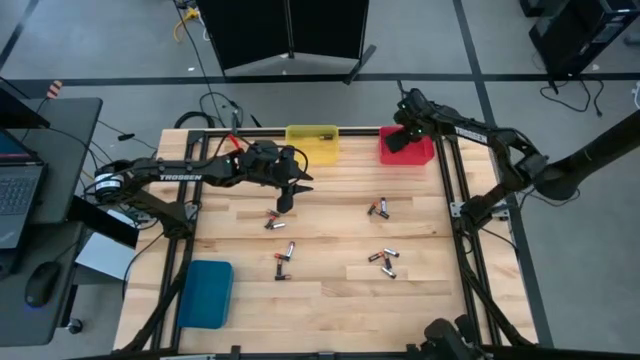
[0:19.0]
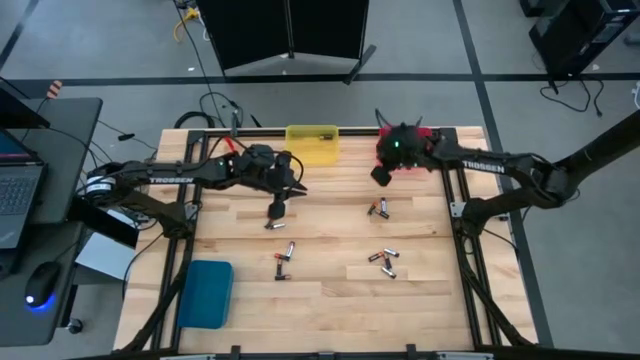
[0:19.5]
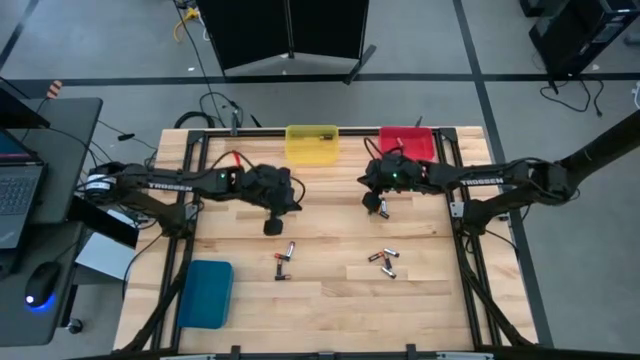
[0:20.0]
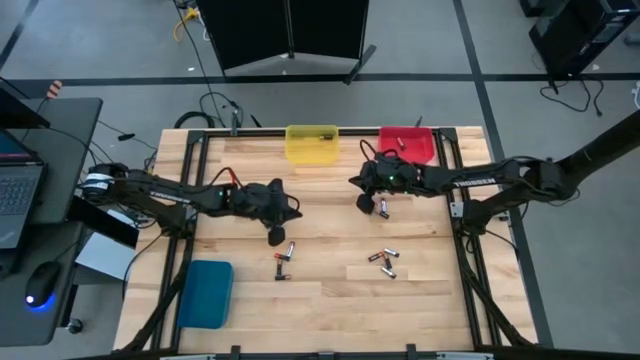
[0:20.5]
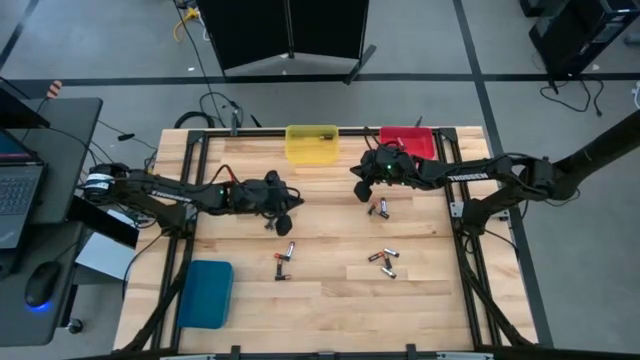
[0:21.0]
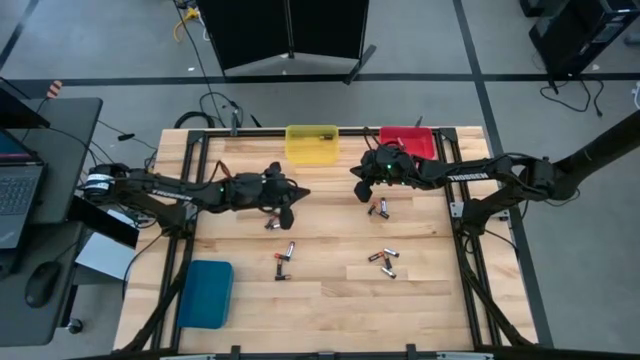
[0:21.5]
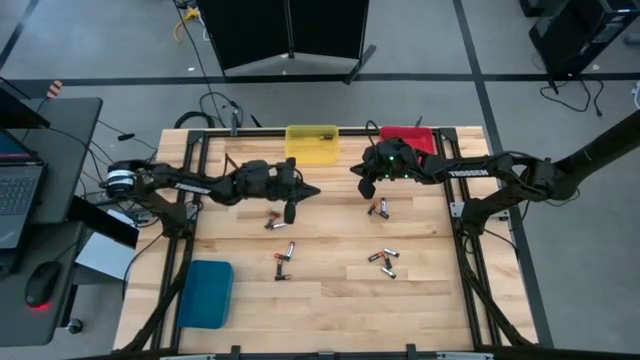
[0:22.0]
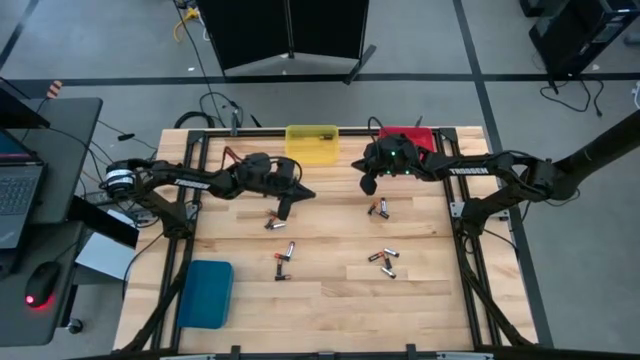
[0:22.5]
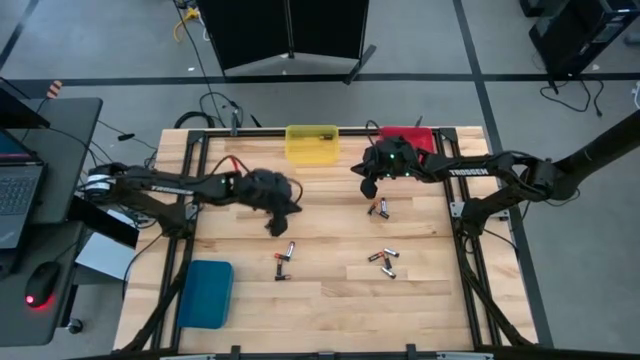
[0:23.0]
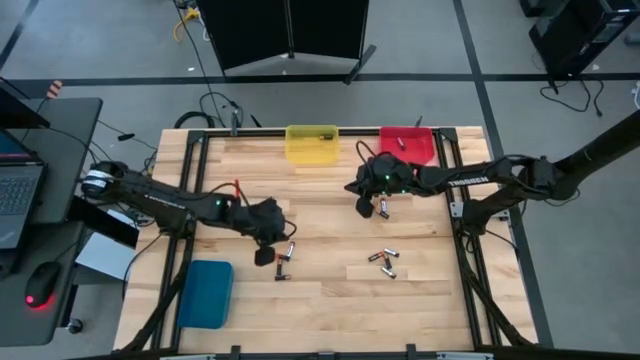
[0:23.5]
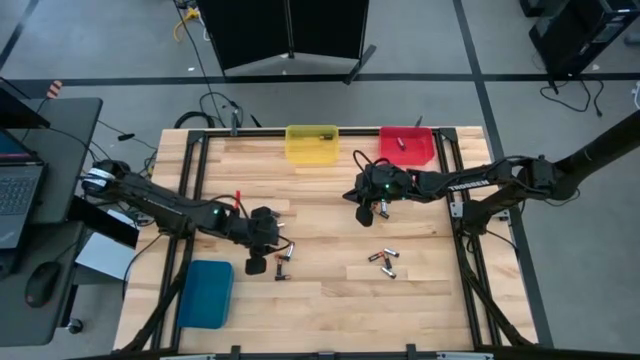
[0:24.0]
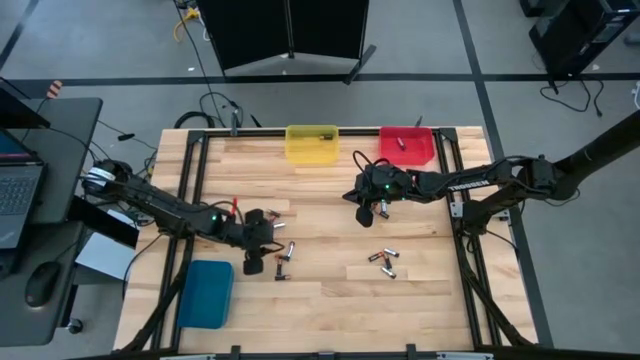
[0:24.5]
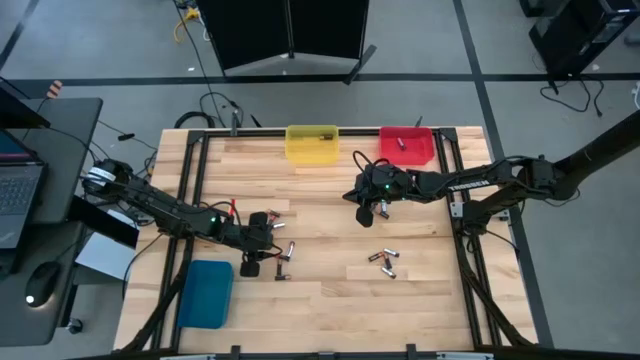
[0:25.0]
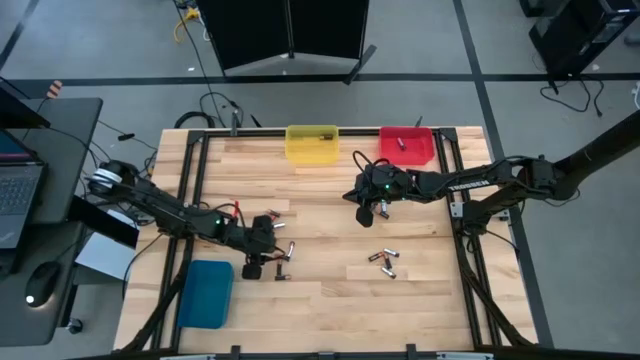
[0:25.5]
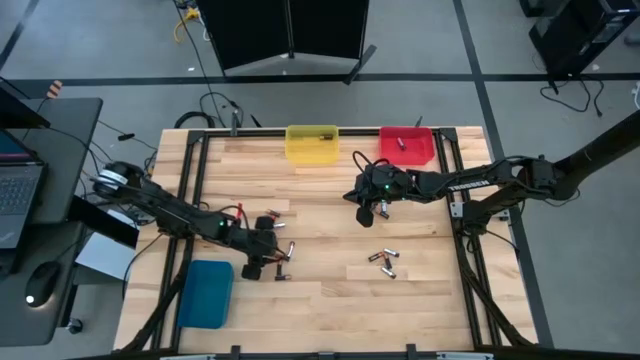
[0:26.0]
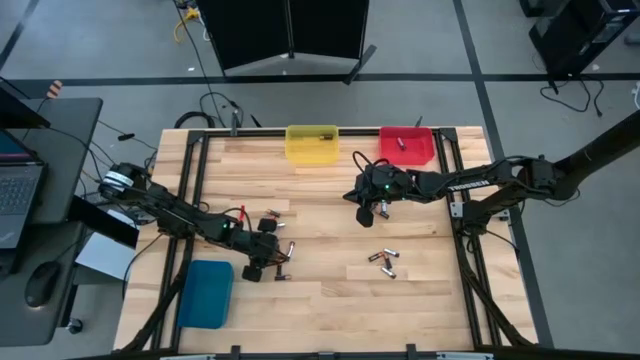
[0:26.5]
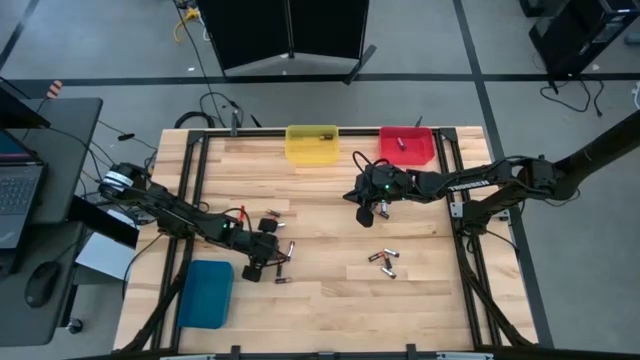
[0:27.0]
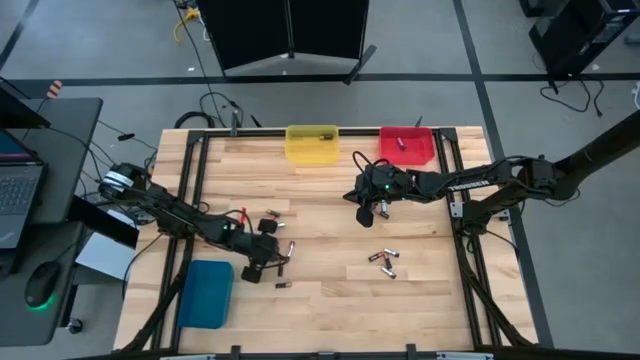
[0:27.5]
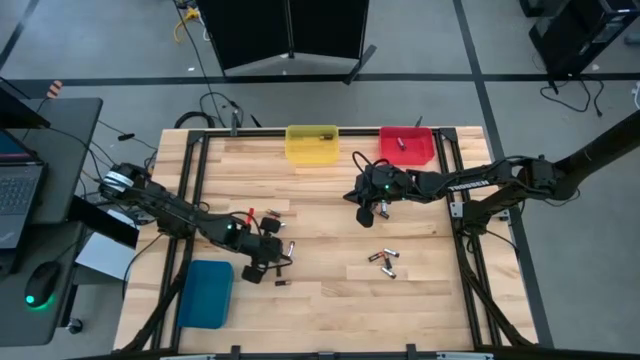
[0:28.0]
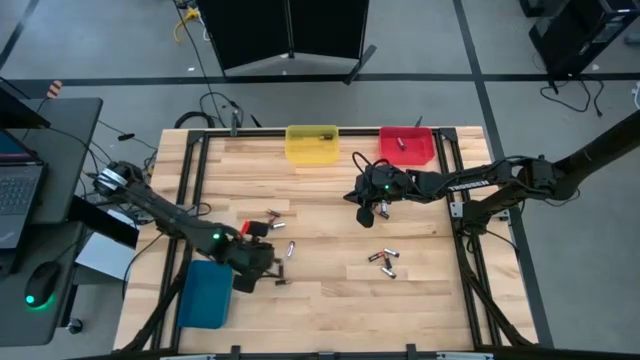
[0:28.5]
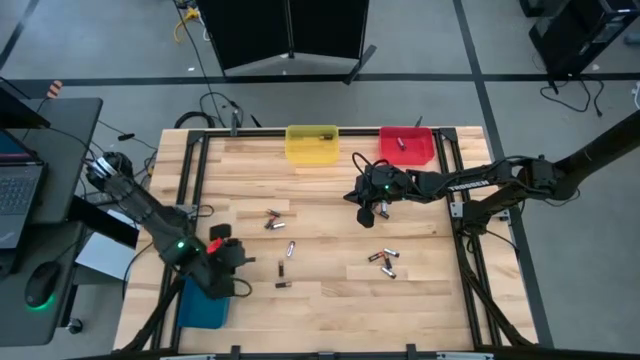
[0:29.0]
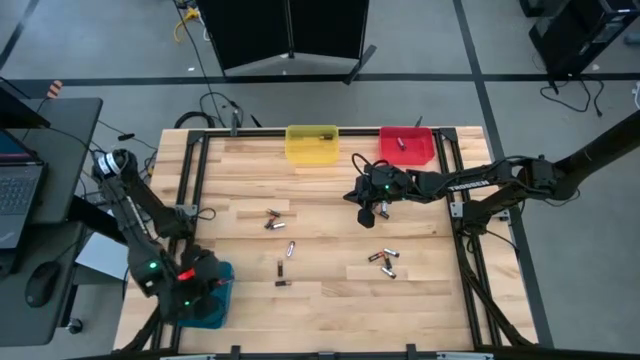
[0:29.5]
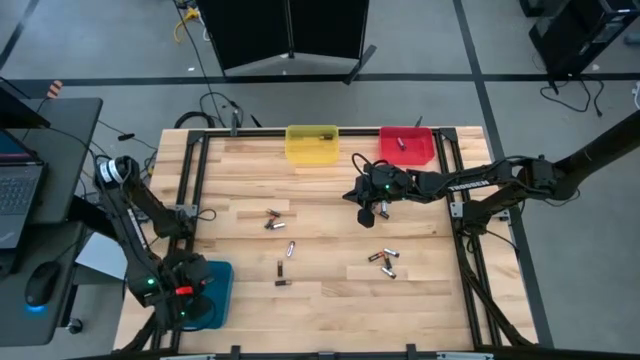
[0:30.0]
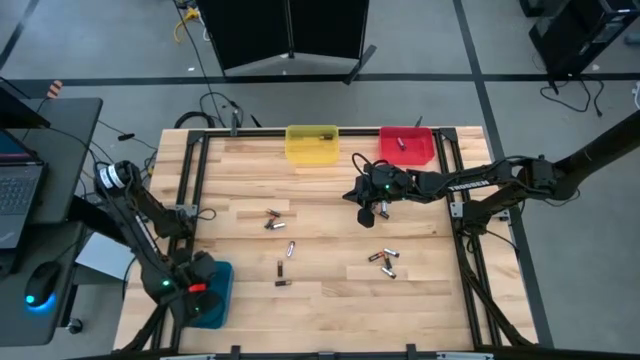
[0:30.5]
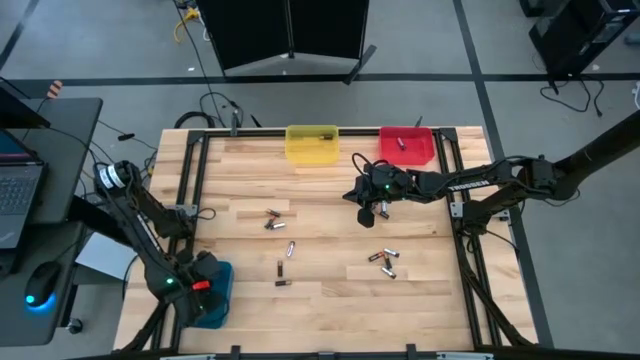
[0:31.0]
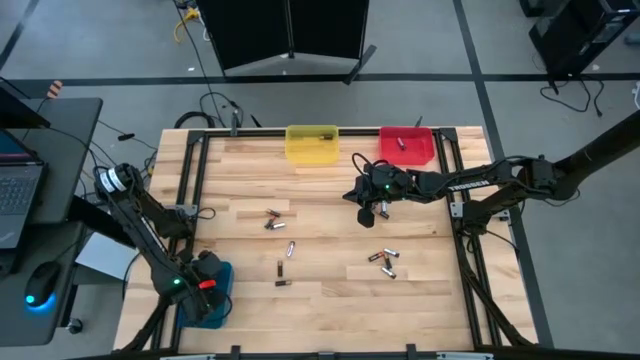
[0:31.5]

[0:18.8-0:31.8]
Task: Sort batteries
Put the black-red battery into the blue bin

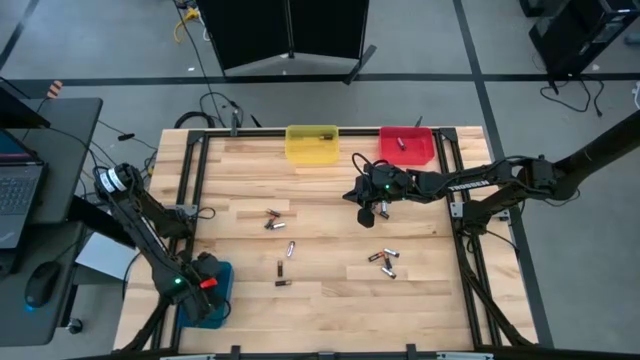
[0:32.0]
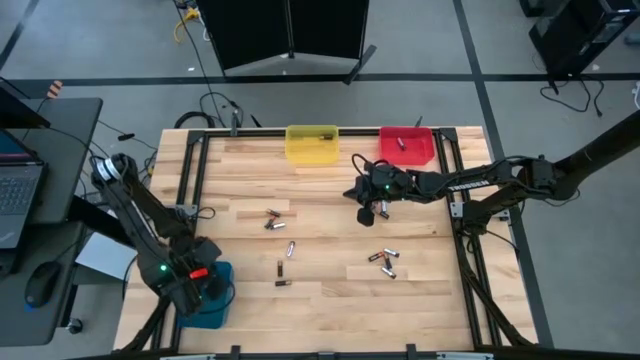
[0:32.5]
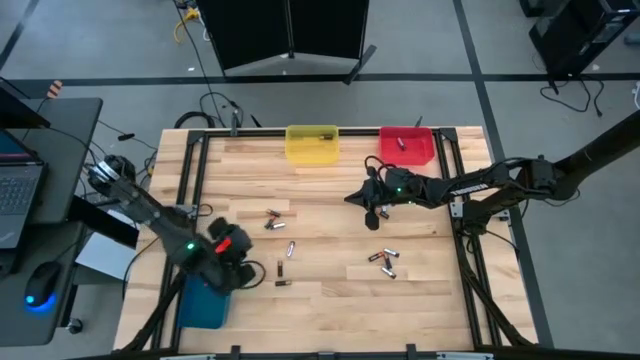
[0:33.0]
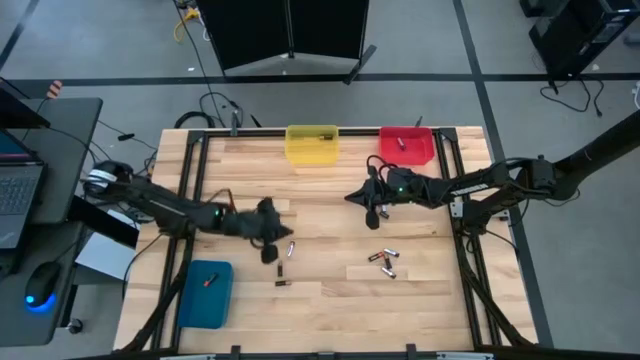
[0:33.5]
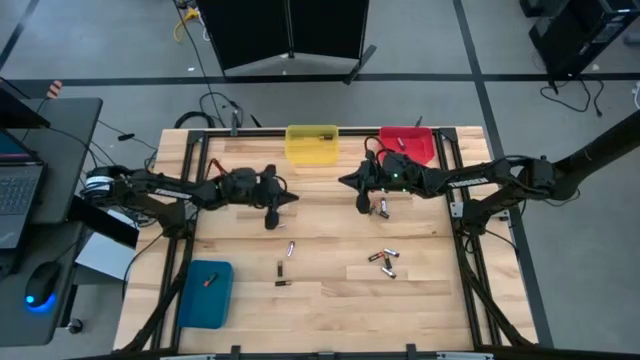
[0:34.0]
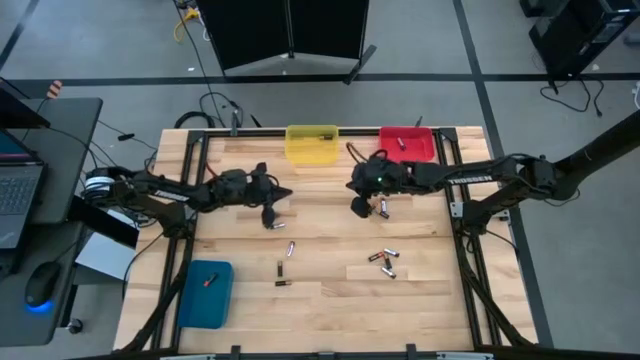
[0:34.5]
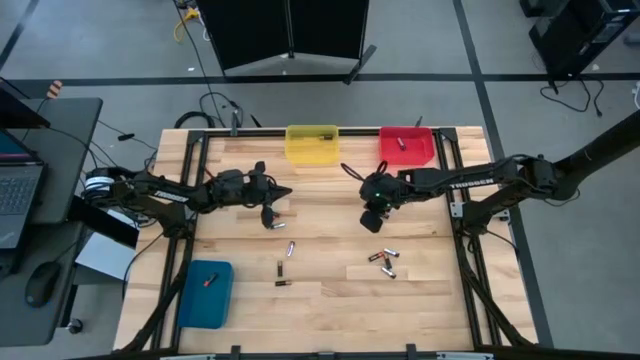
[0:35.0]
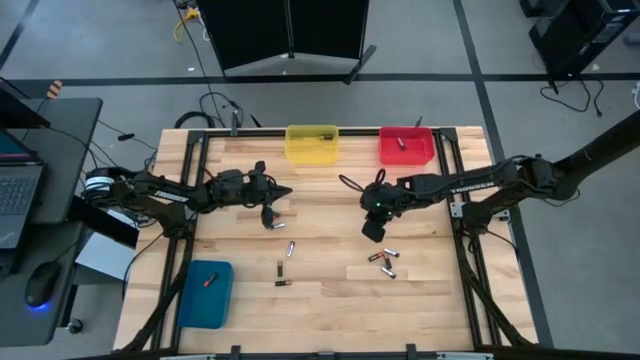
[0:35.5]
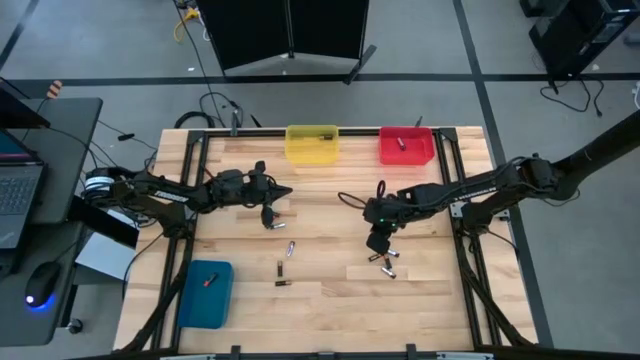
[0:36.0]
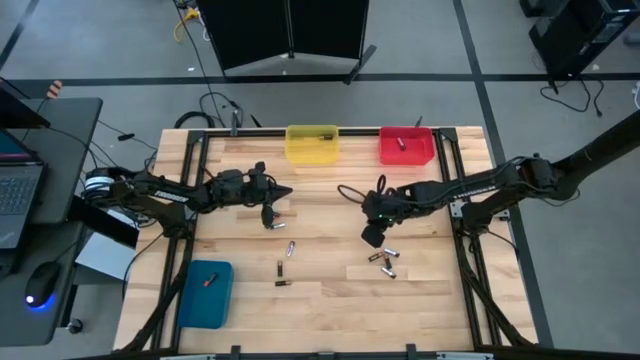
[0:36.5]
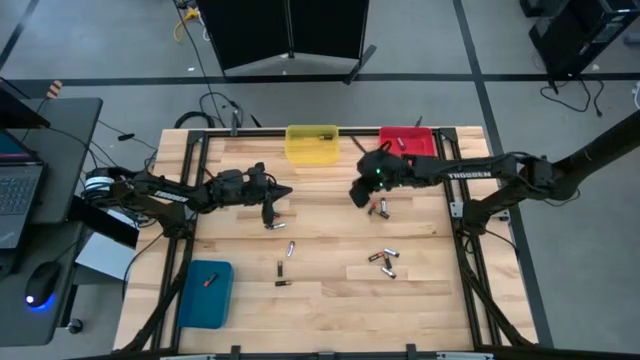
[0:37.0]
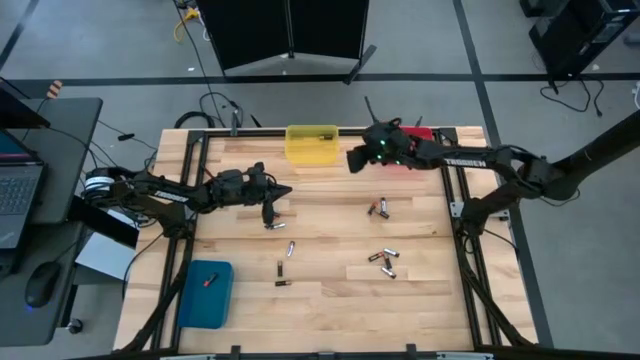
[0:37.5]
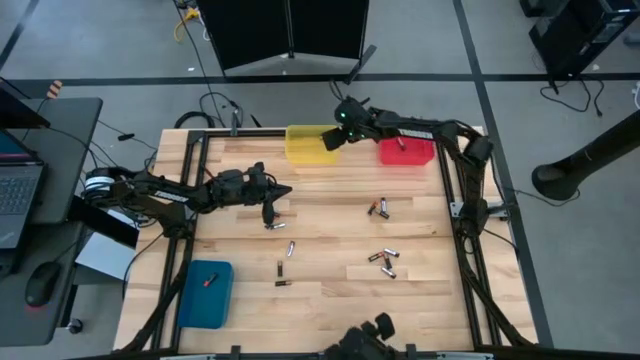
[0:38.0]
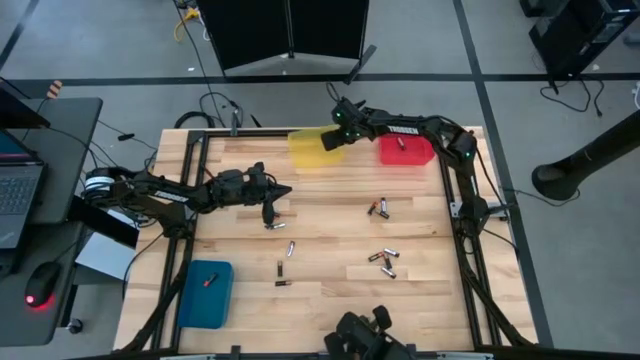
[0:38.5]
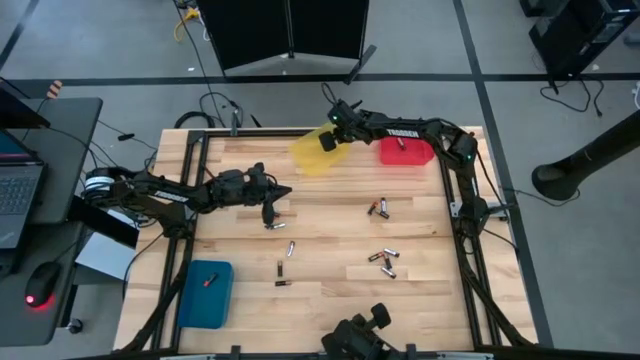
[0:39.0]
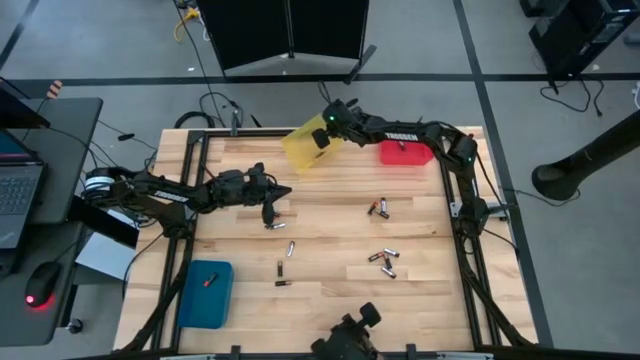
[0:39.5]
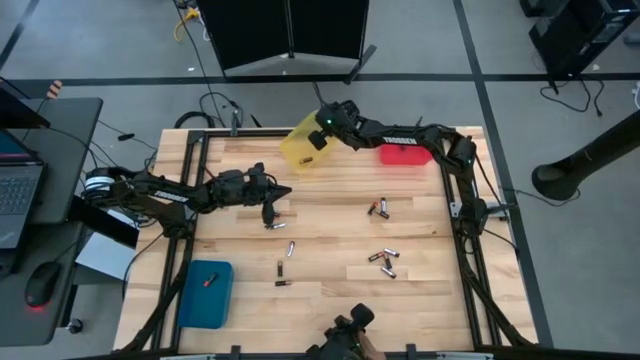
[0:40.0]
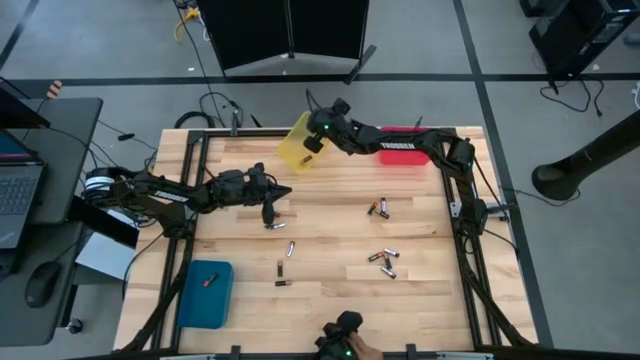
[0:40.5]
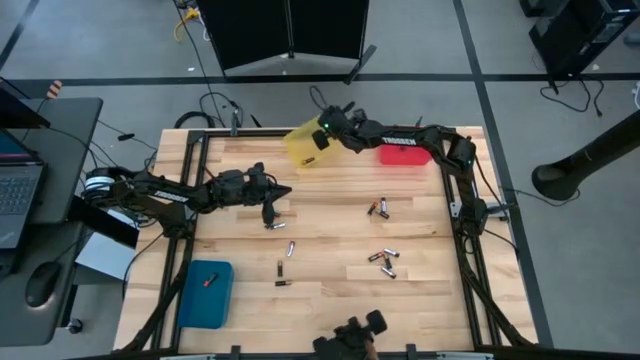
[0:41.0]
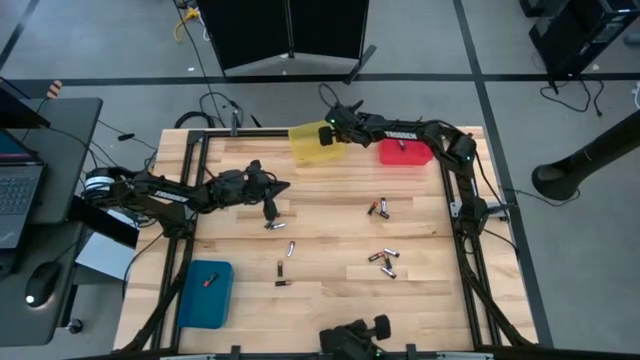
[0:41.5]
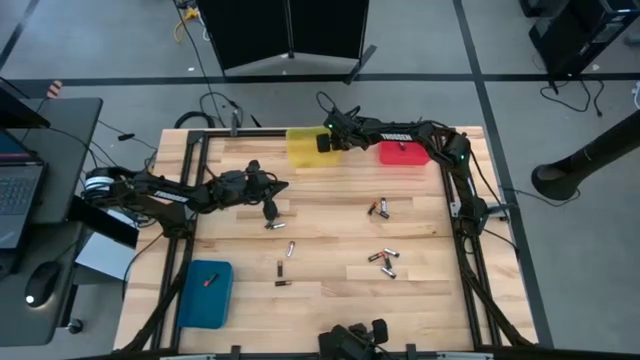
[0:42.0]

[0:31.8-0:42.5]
Adjust the yellow bin
